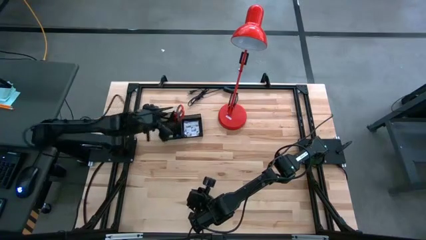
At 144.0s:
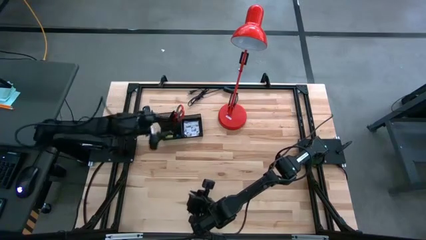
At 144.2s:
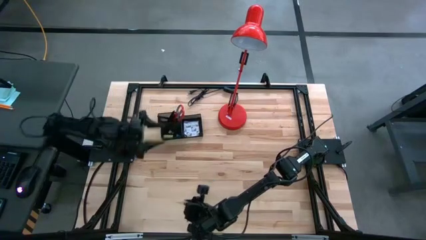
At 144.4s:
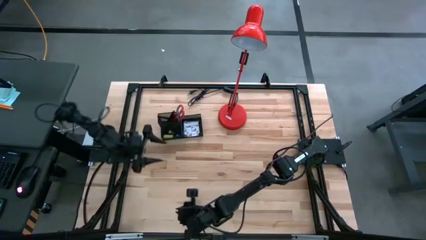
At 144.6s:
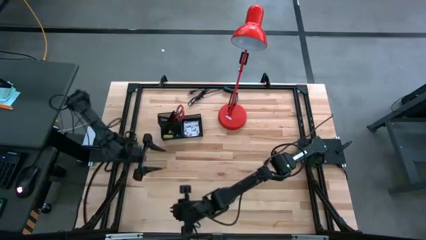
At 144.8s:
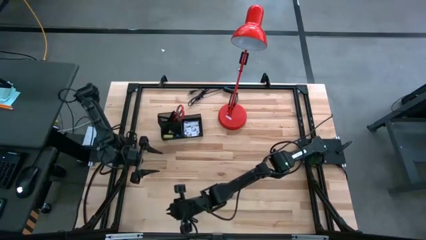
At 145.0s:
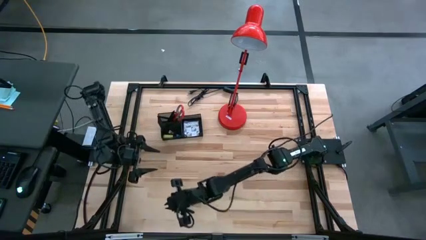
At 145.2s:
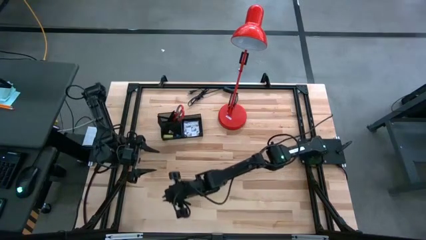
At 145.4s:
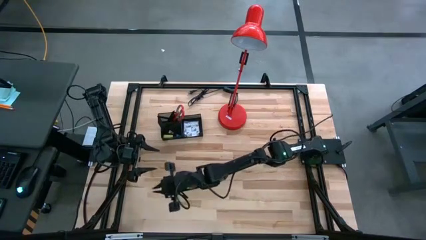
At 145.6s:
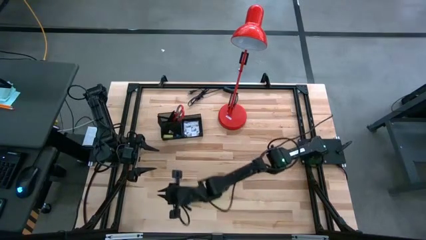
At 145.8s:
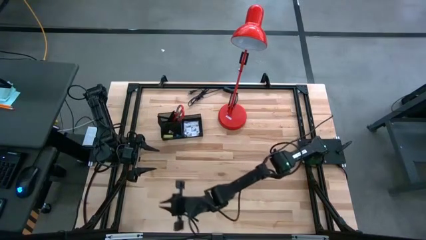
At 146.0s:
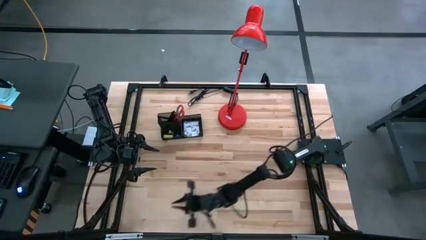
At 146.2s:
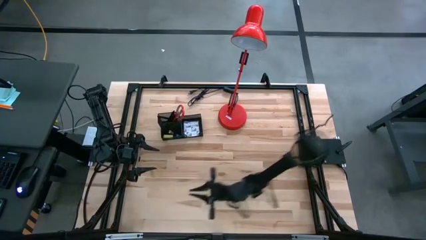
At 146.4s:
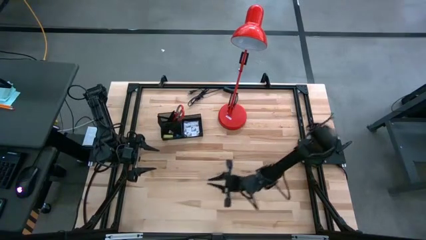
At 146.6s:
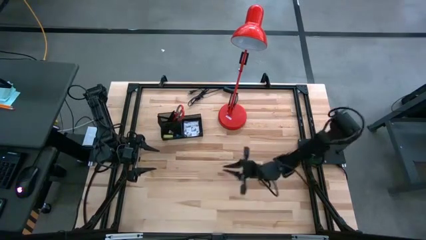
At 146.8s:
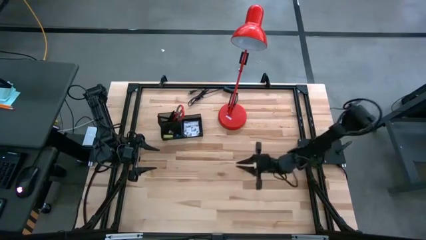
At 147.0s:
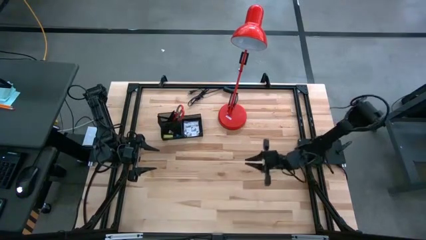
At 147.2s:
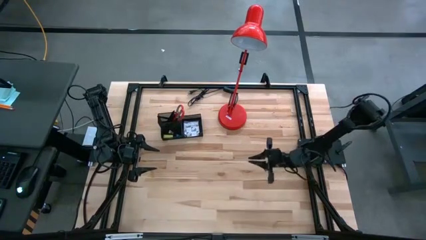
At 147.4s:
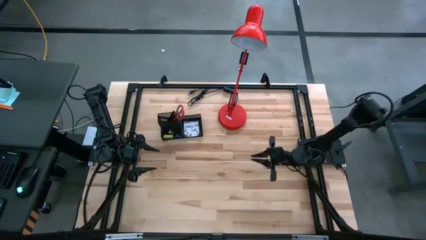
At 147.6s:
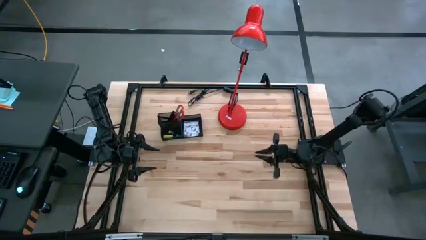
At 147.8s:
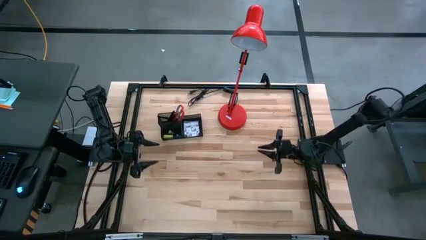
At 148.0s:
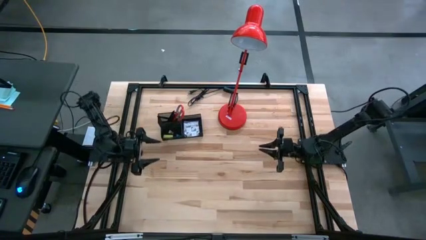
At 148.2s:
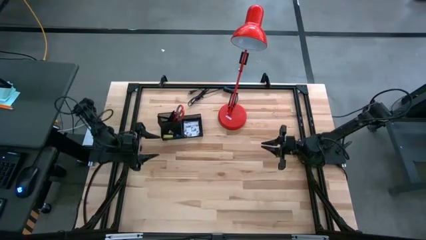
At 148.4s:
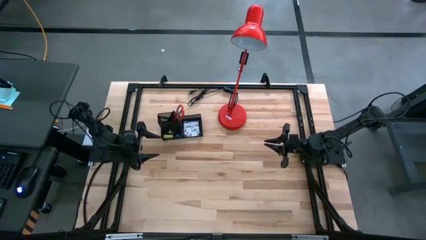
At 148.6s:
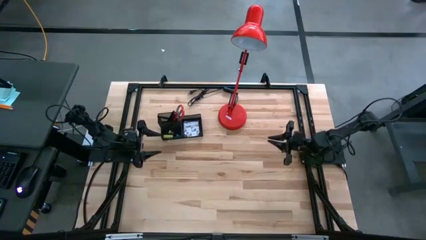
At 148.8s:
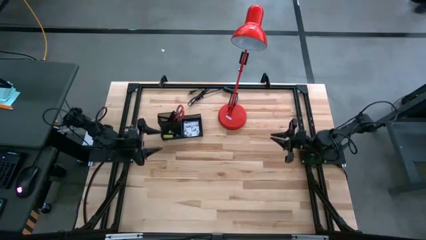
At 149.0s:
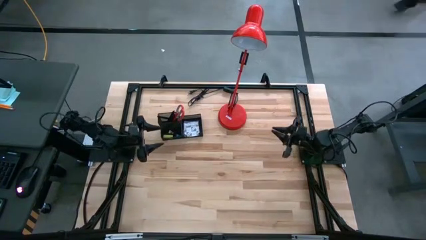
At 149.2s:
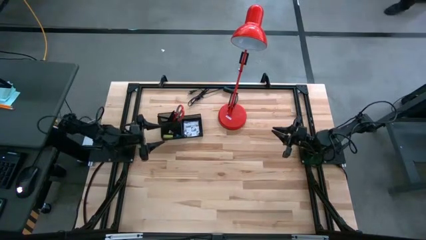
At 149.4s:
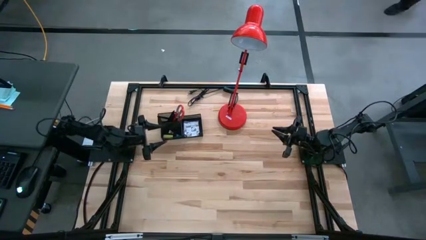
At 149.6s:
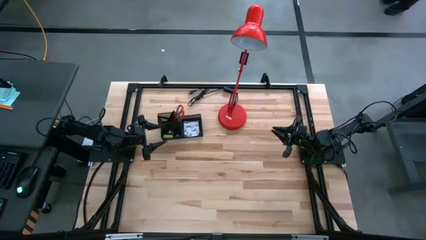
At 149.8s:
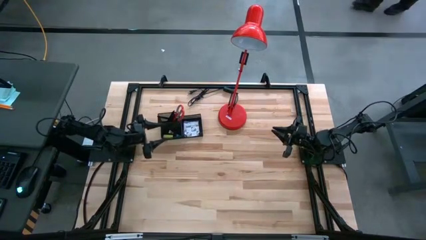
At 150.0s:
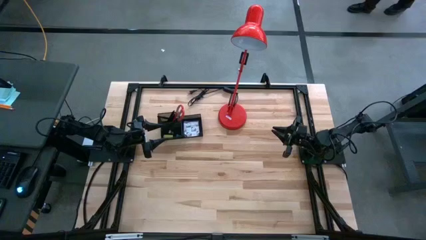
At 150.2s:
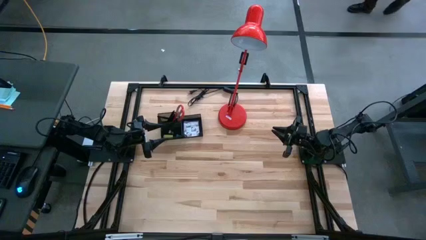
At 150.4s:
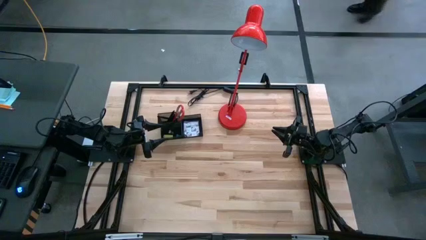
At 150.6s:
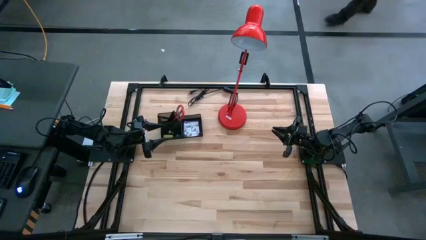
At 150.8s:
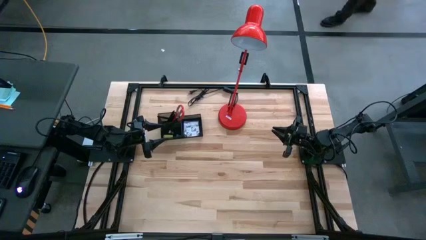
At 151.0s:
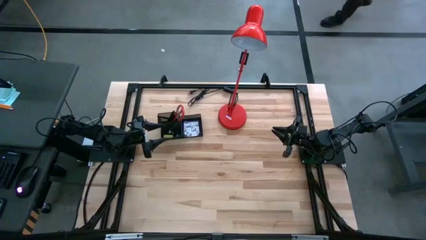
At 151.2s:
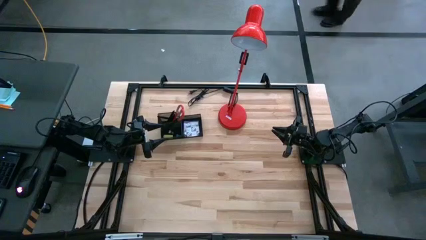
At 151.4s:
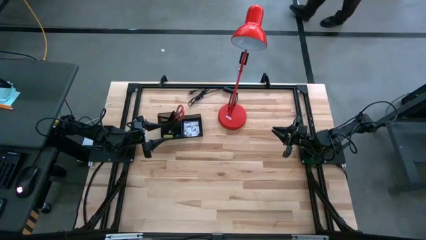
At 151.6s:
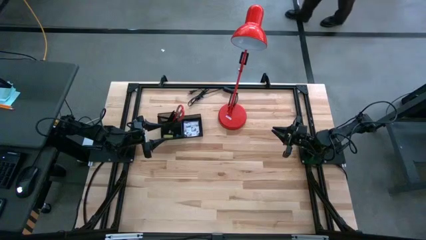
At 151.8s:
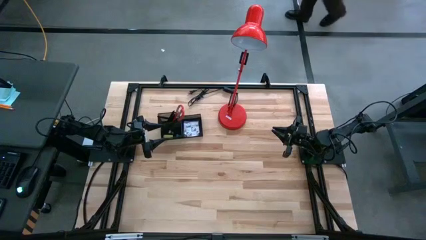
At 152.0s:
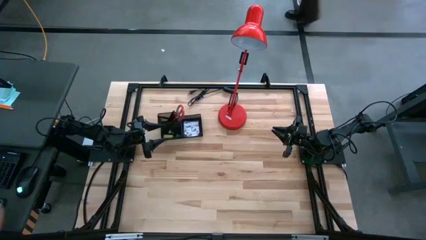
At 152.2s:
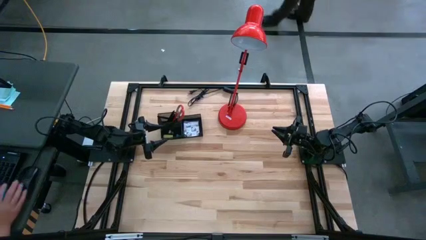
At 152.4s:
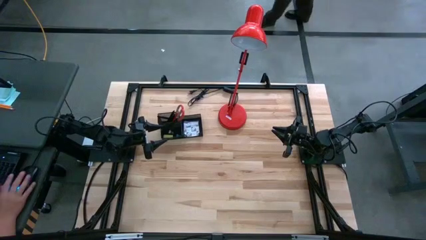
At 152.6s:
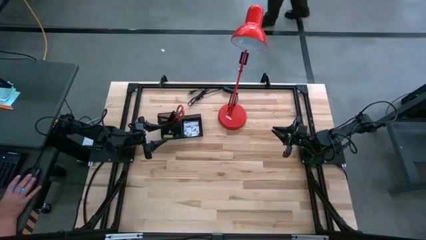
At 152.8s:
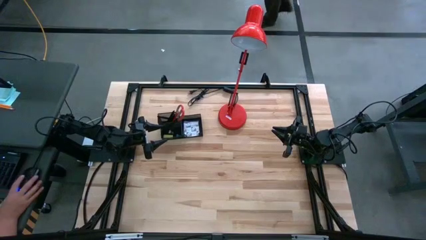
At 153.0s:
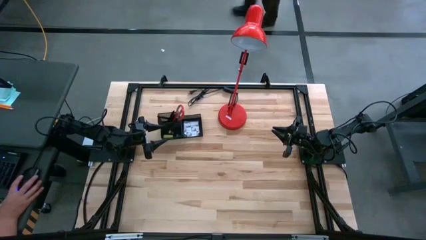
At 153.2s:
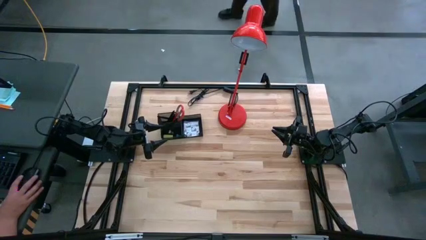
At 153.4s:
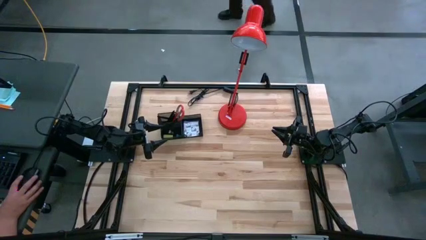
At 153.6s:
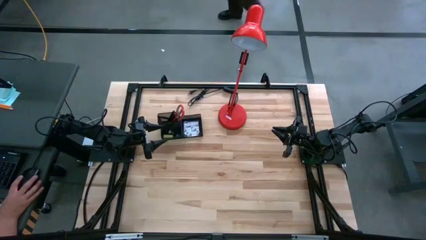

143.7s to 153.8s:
Task: Pick and place office supplies into organizer
Return to Home Position

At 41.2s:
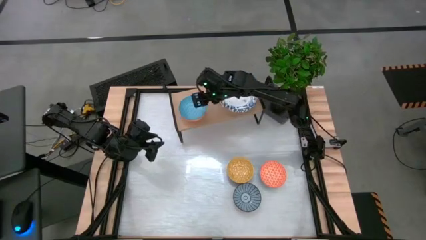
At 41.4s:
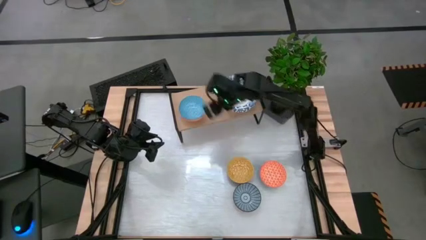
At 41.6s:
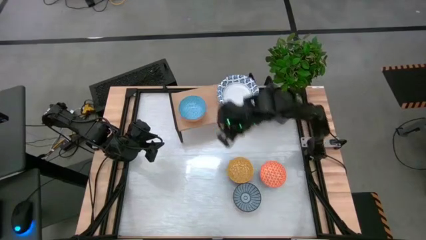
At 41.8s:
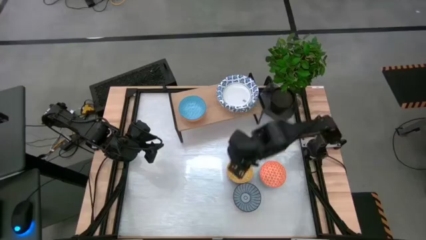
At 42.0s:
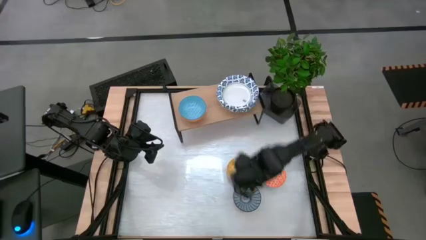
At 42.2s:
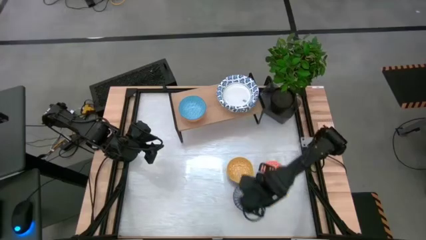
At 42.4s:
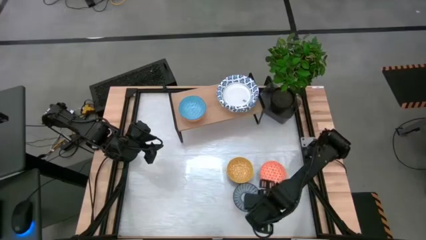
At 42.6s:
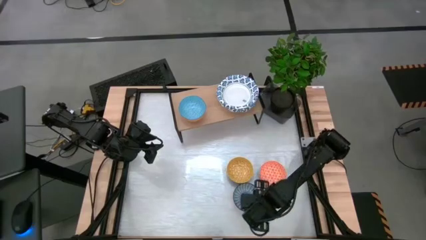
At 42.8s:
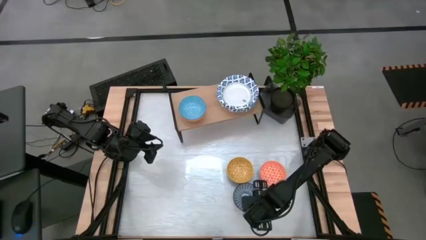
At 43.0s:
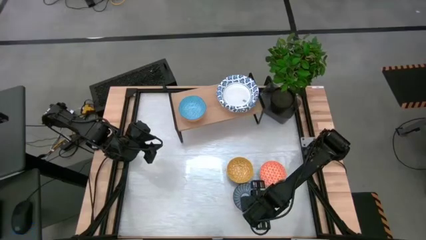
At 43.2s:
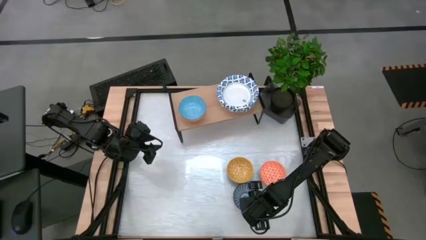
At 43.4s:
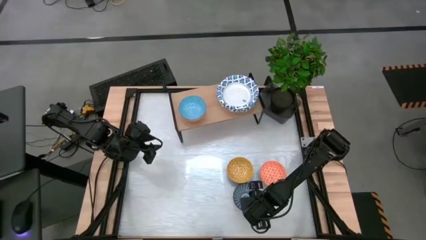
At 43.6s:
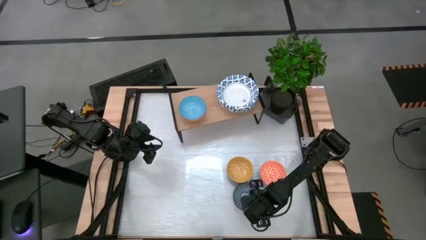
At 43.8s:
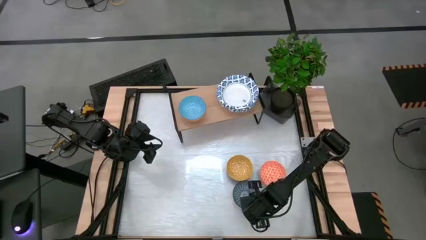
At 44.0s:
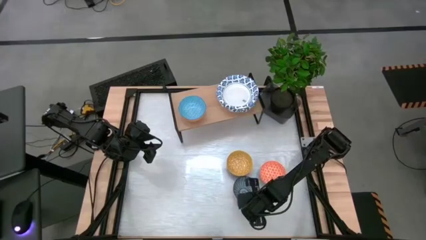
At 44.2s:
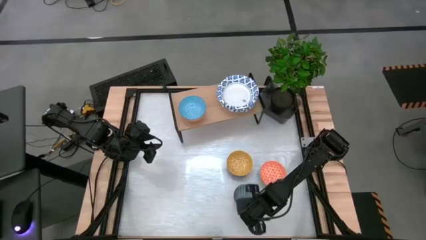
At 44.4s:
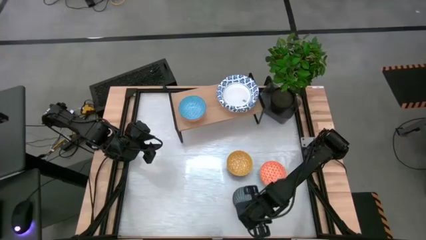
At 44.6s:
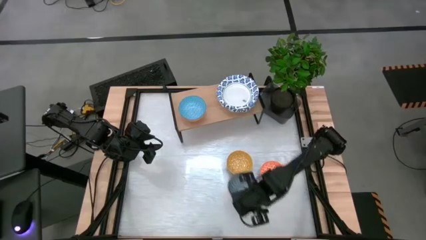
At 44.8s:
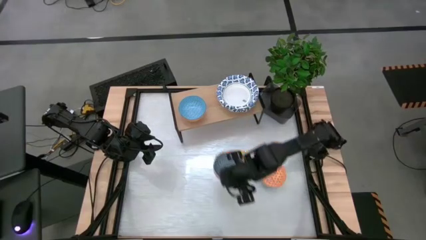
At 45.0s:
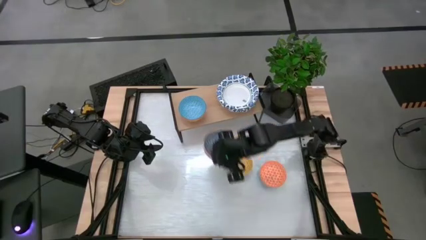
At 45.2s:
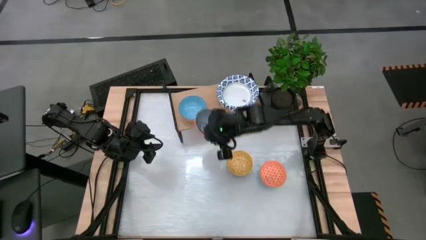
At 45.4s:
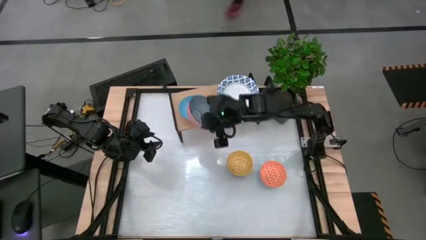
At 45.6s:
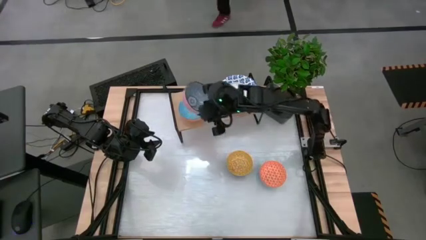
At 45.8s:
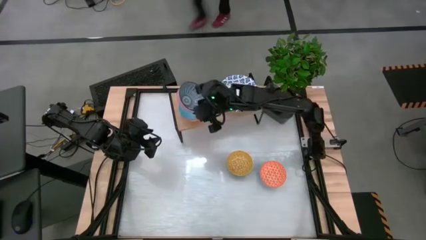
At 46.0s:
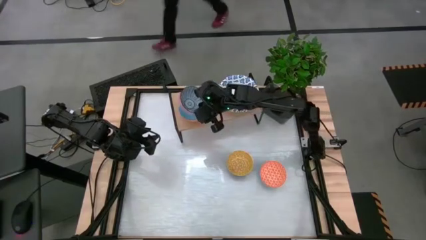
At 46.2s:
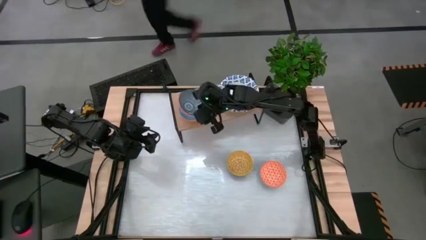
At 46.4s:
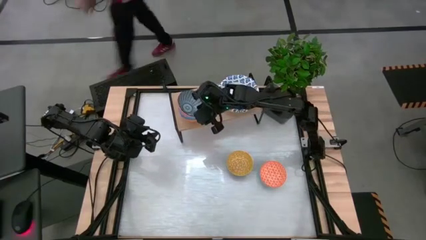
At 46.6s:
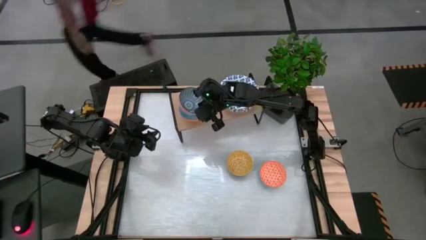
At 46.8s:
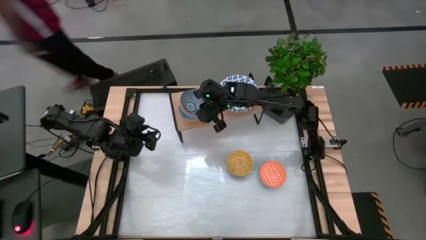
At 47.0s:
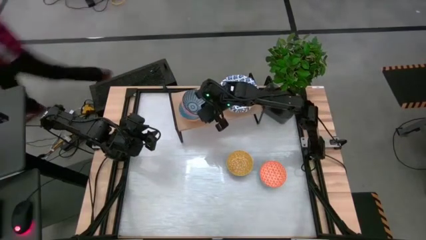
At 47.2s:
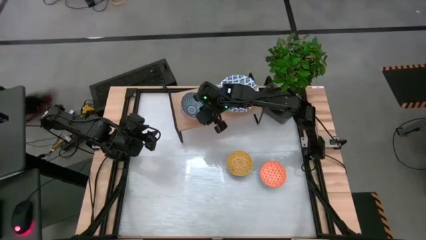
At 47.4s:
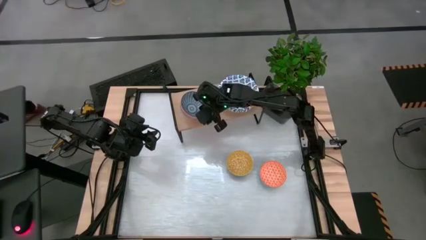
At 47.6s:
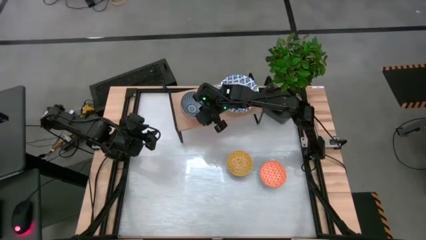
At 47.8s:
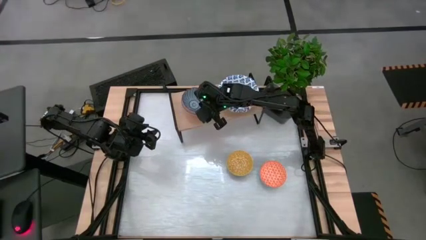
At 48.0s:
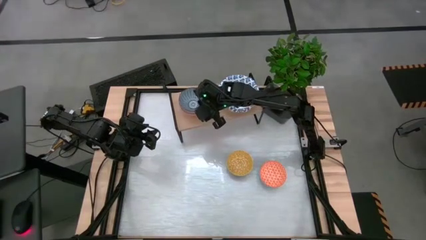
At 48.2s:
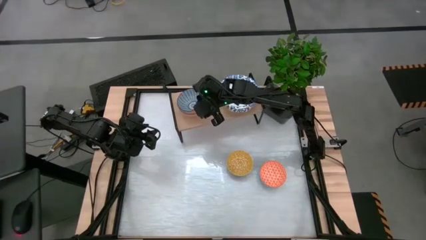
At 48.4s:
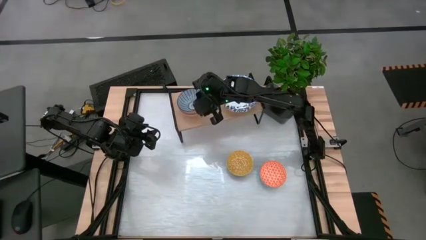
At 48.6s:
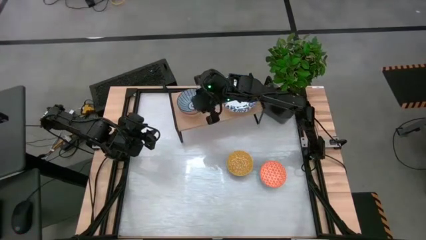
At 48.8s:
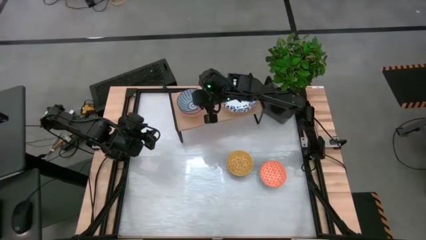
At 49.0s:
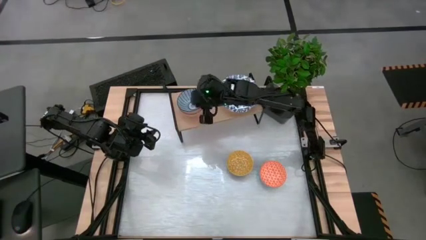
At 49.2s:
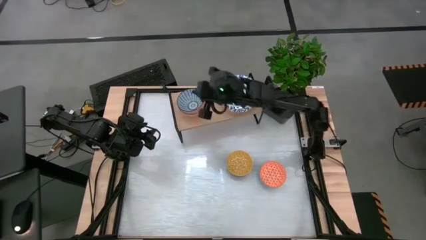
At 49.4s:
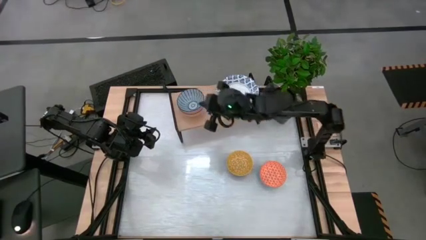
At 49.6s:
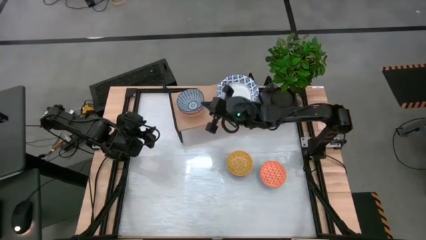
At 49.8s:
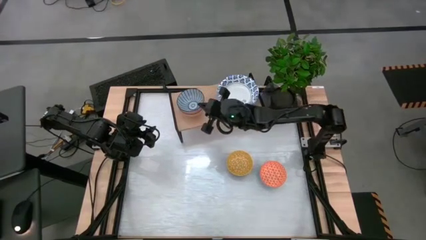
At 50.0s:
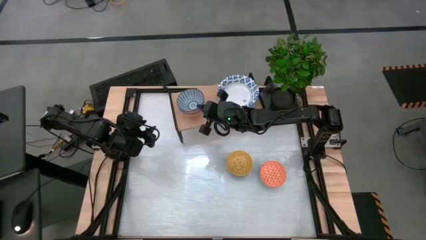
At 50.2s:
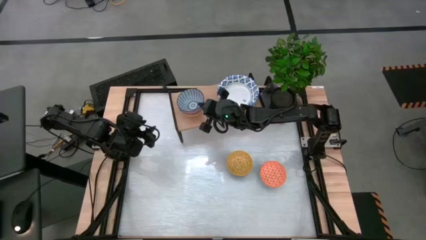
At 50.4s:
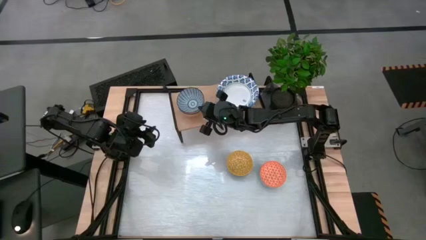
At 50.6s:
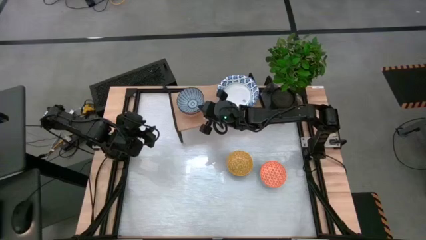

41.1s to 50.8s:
Task: Place and stack bowls onto a shelf
Stack the blue bowl on top of the light blue bowl on the shelf
